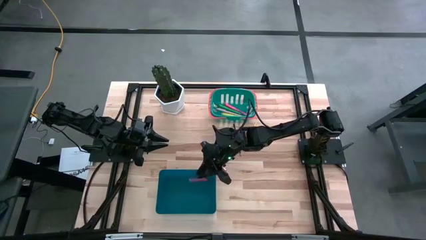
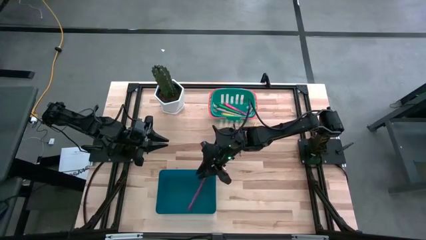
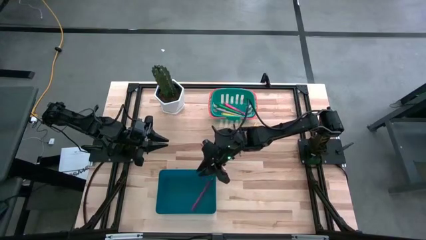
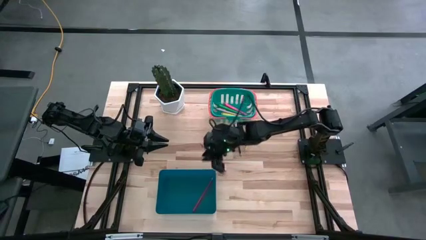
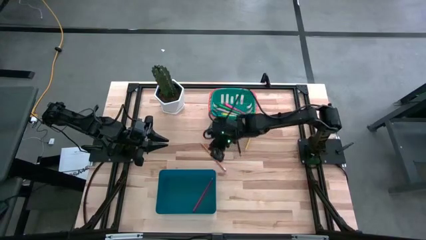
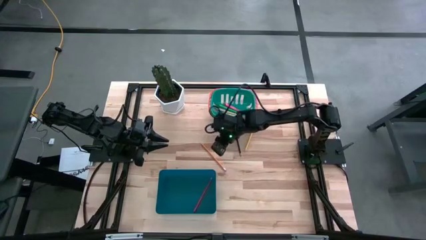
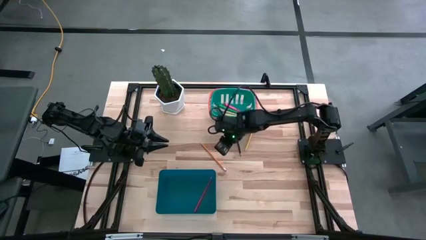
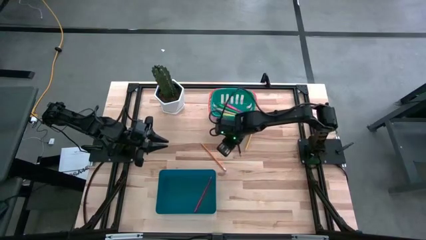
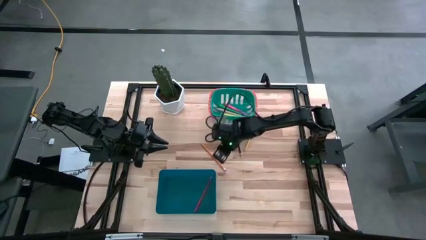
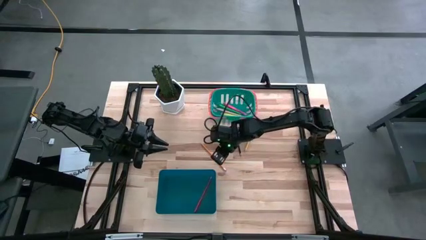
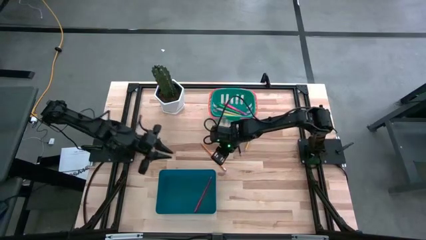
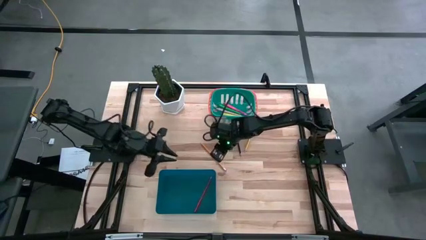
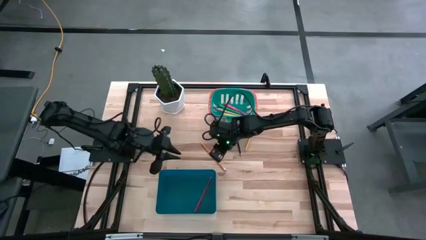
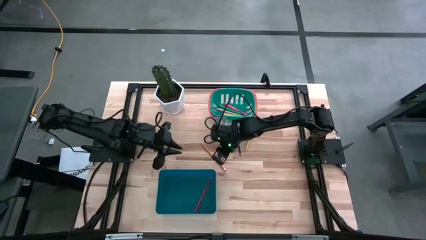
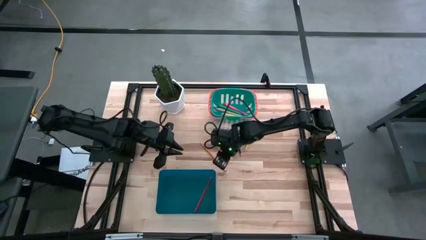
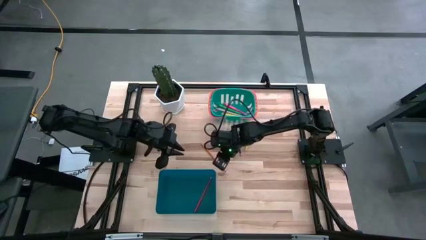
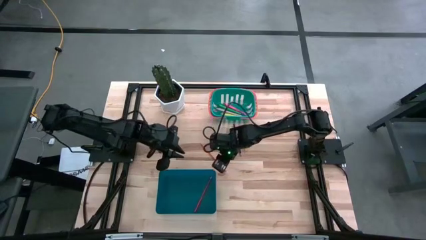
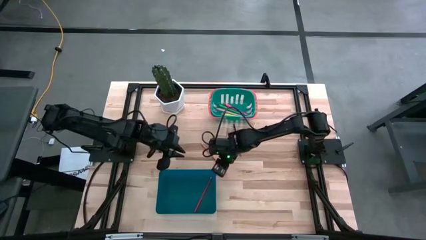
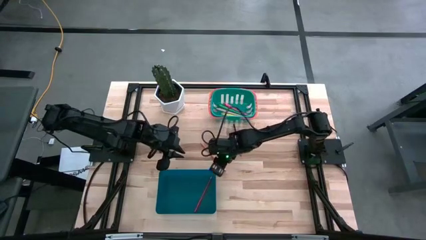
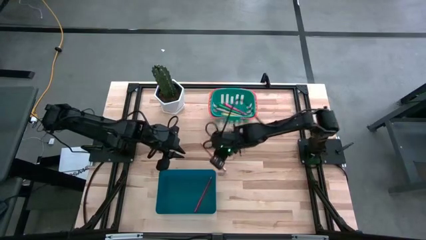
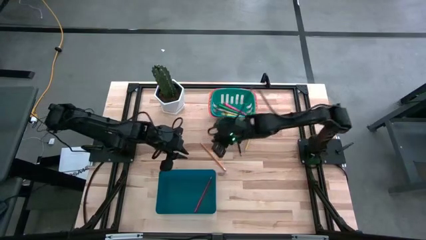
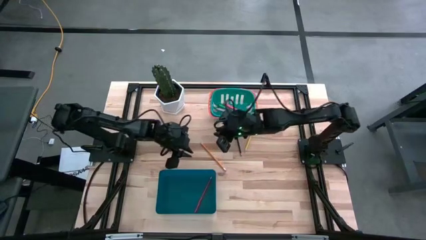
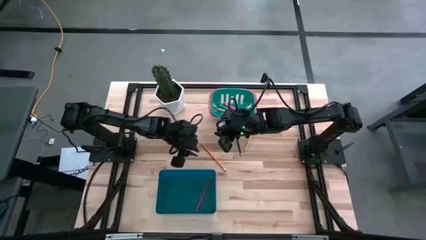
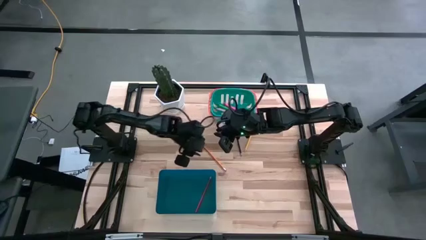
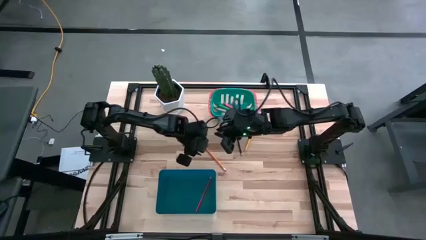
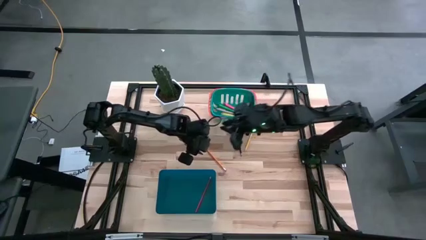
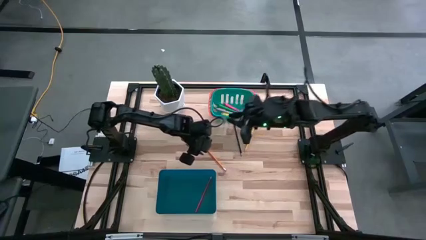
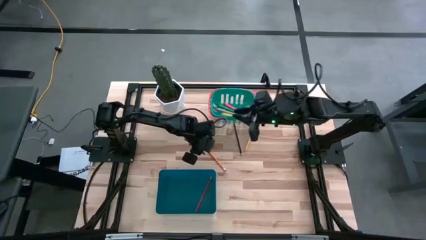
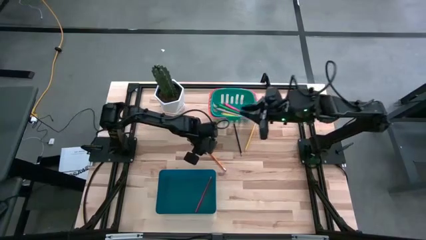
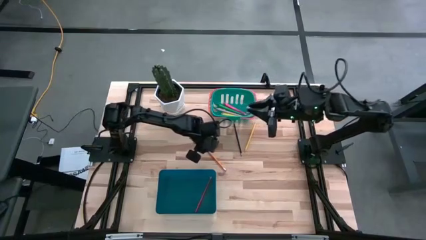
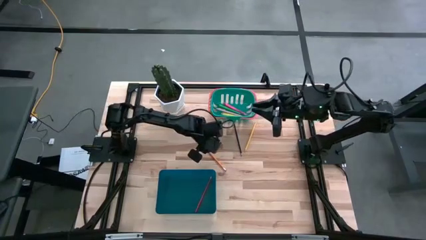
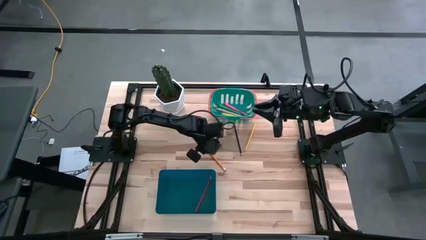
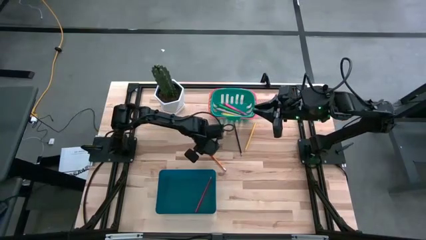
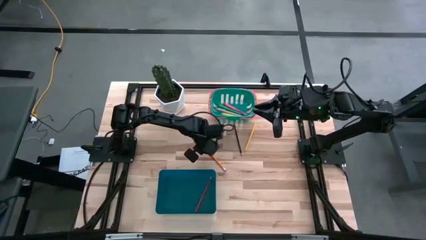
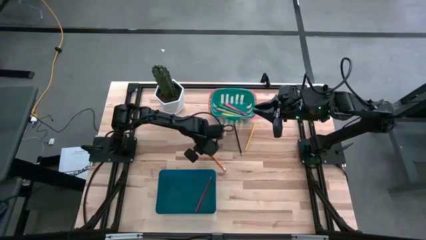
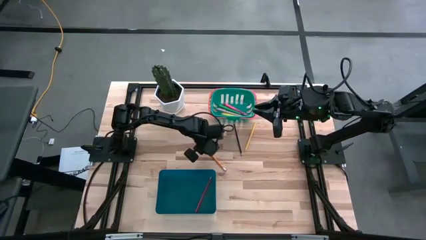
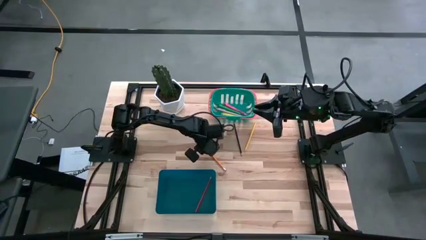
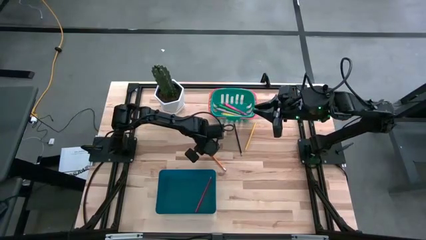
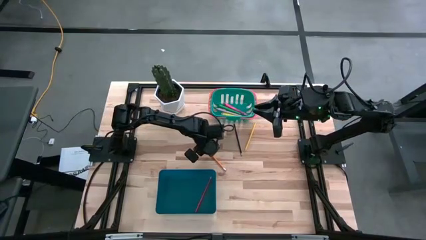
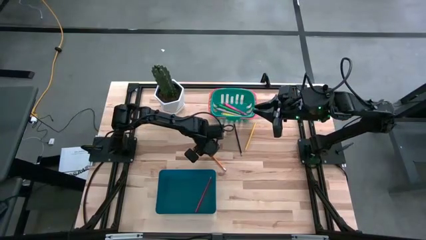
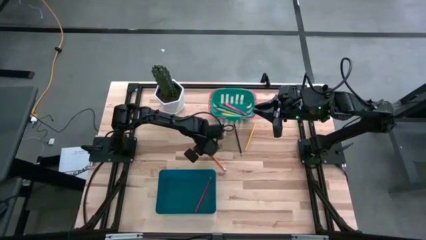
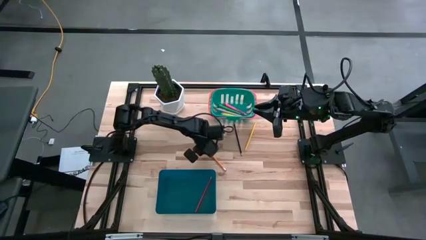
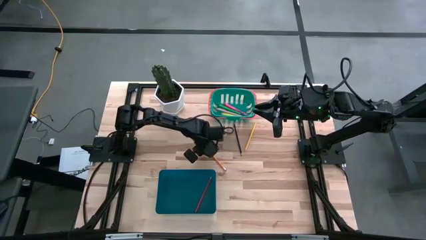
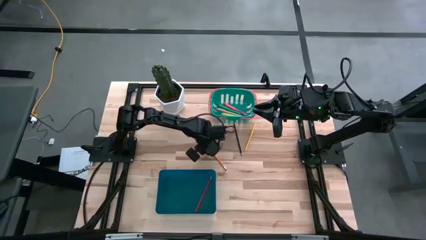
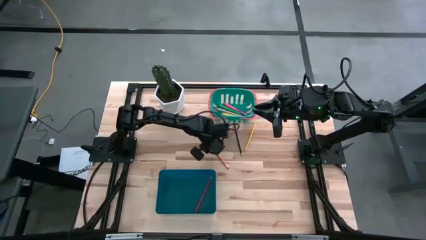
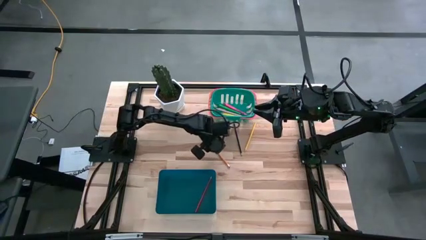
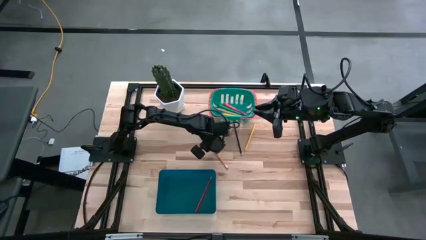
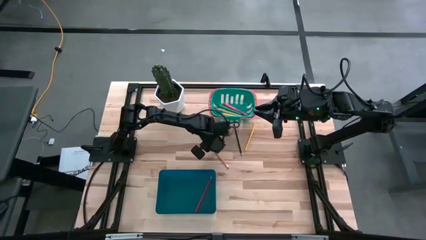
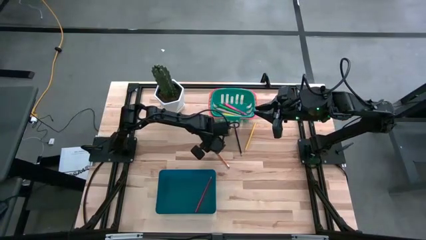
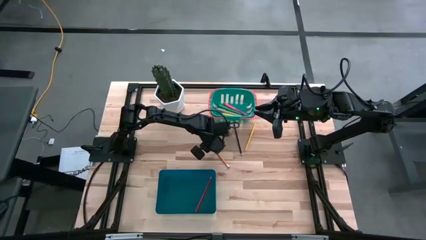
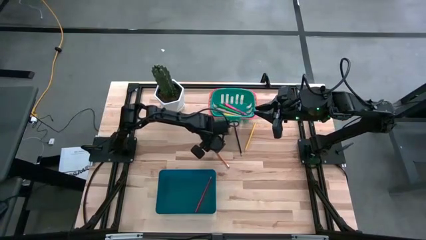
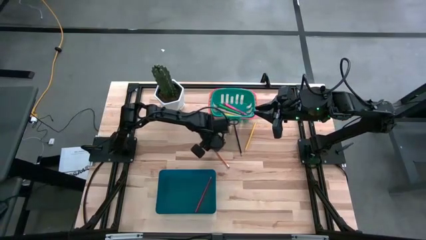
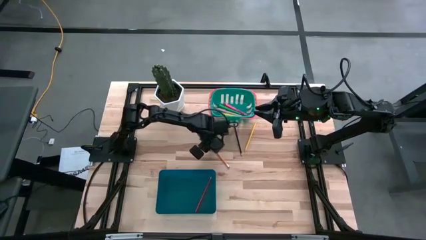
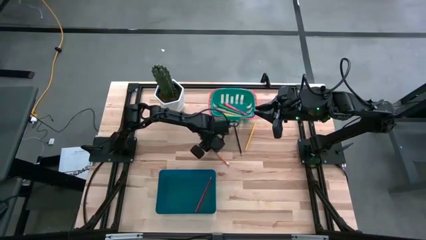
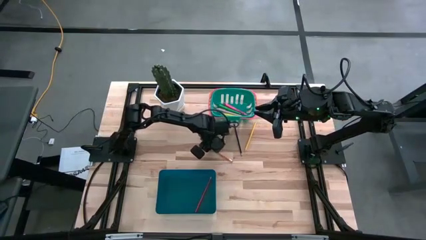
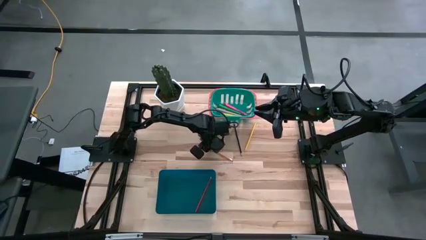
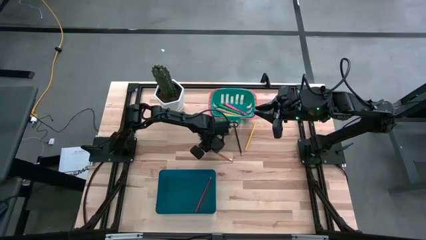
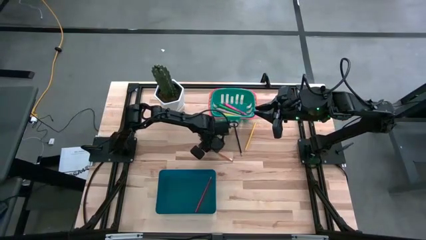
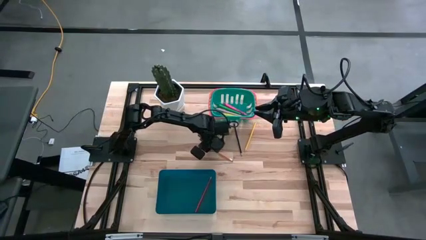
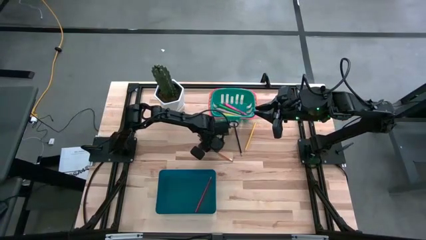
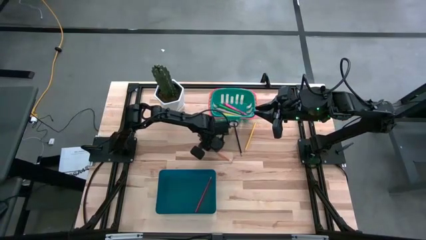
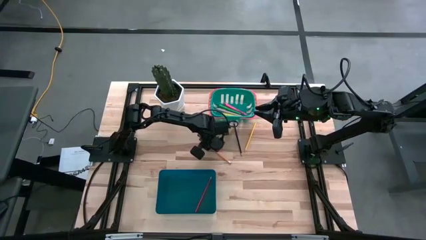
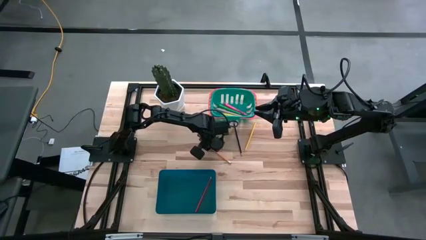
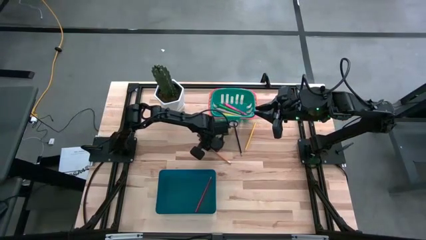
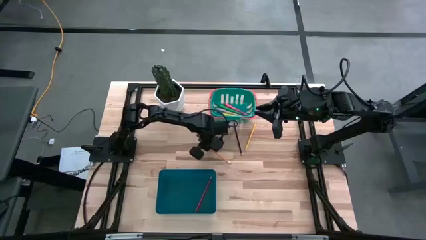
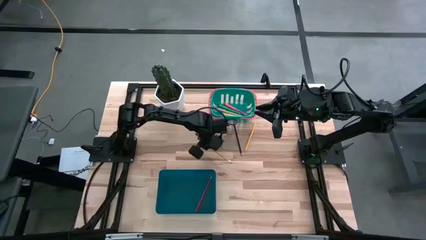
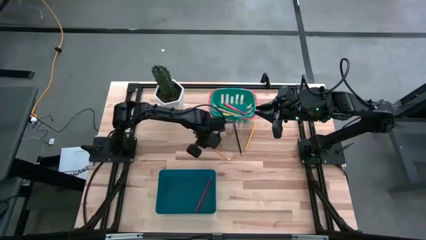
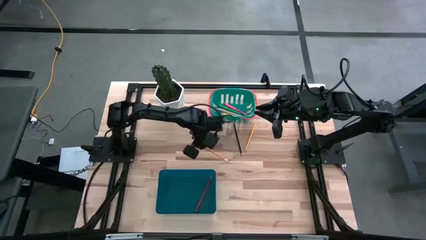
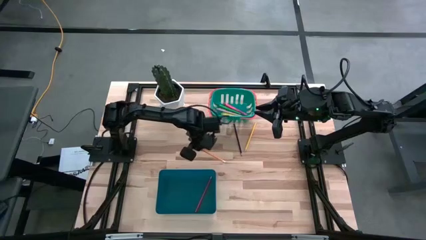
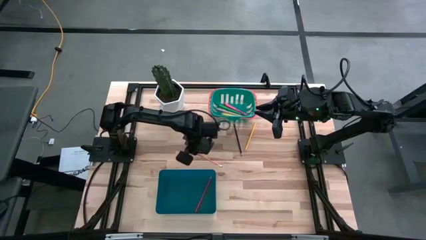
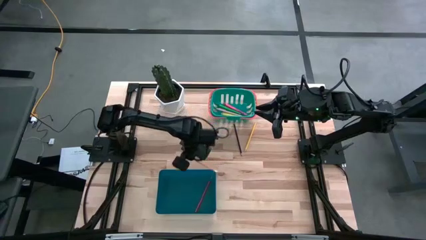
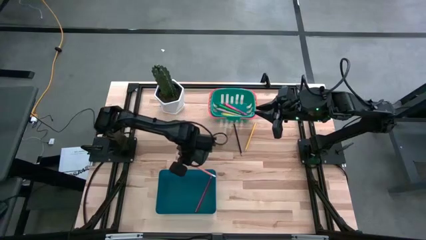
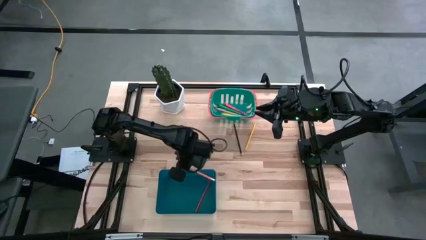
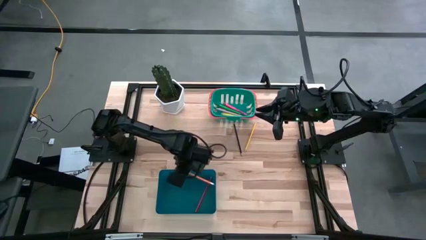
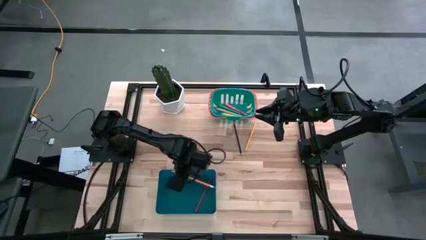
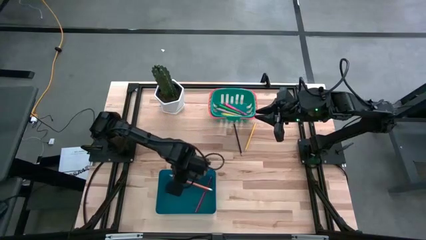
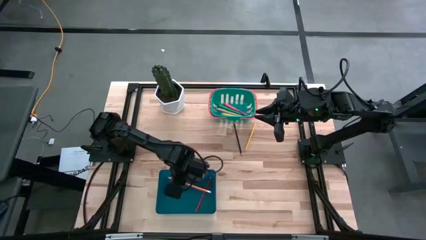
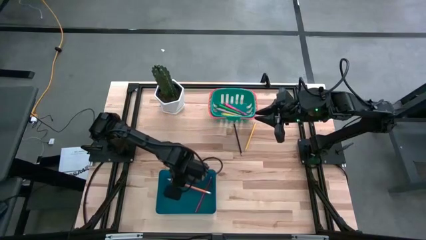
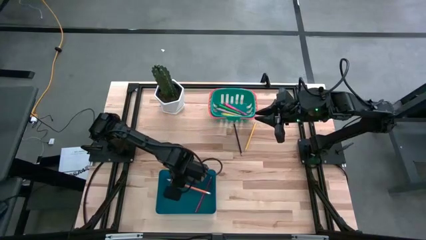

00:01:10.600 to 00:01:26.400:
Task: Sort pens & pencils
Put the orange pencil into the blue bin
